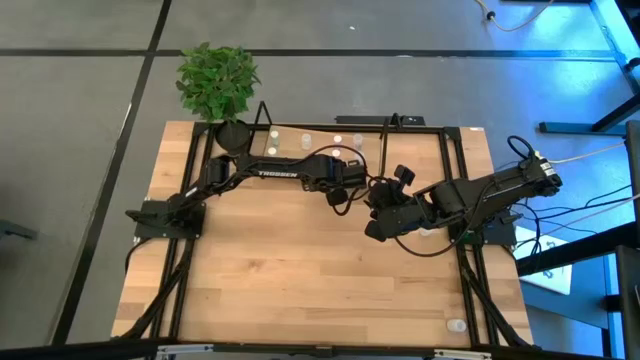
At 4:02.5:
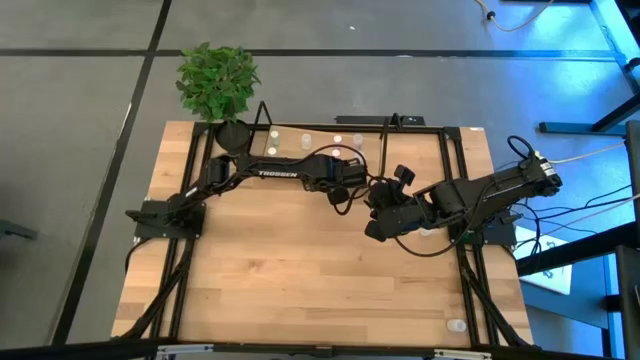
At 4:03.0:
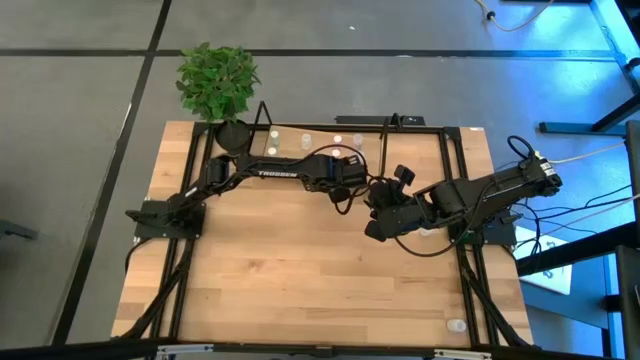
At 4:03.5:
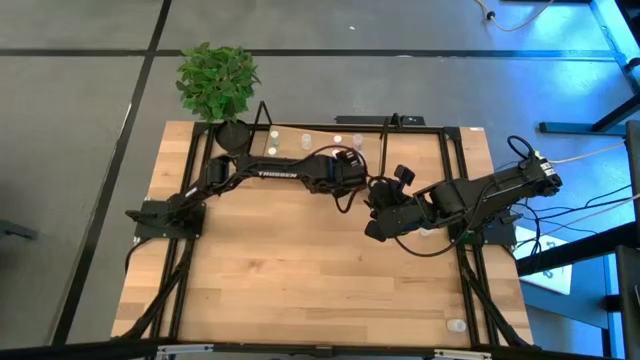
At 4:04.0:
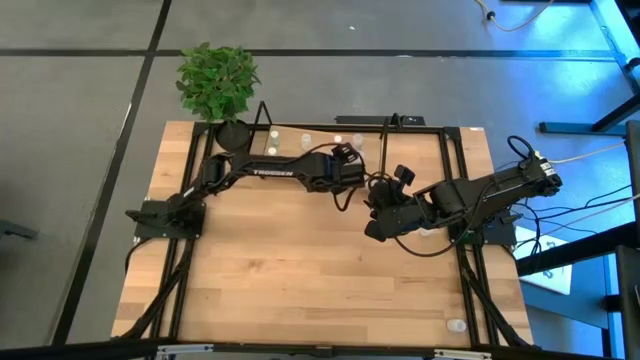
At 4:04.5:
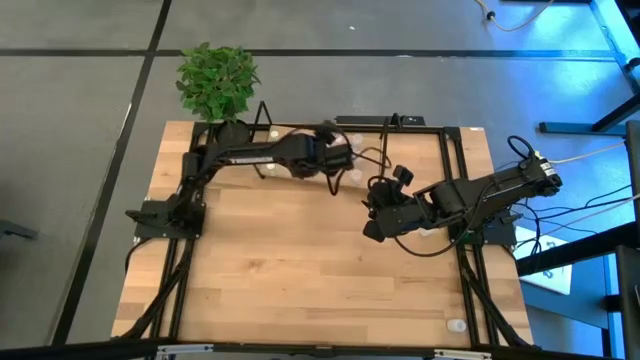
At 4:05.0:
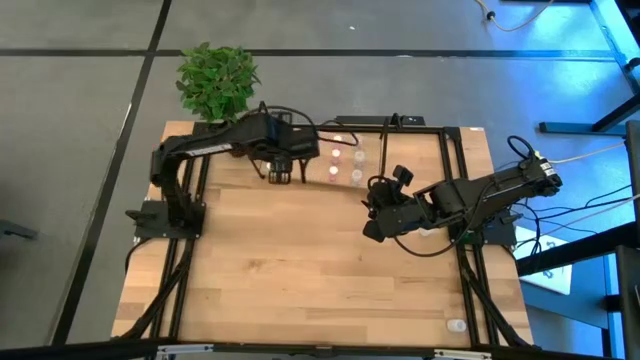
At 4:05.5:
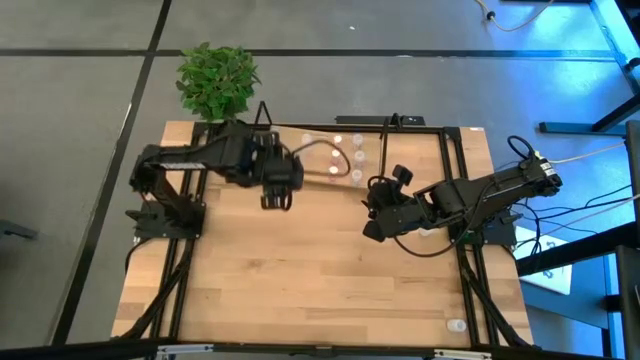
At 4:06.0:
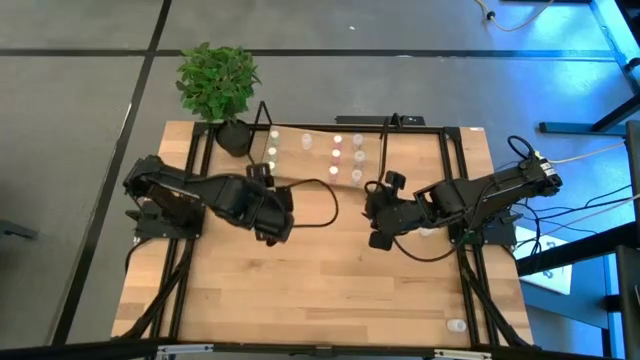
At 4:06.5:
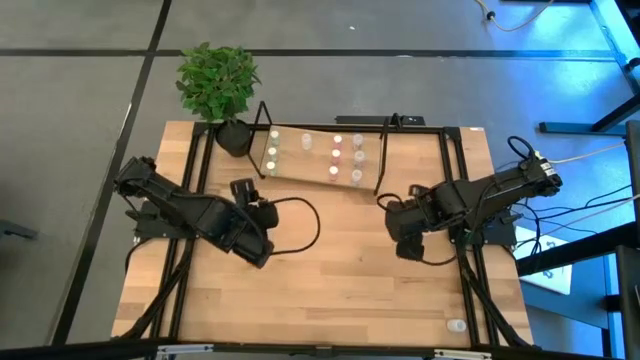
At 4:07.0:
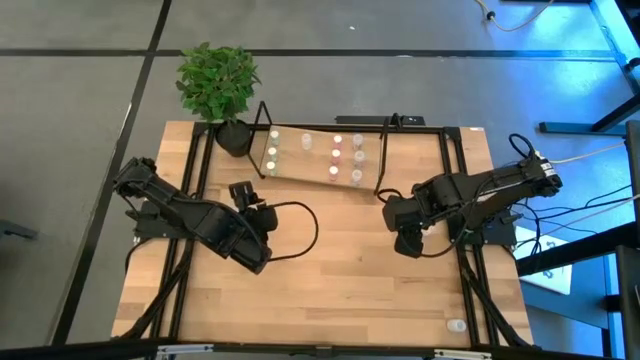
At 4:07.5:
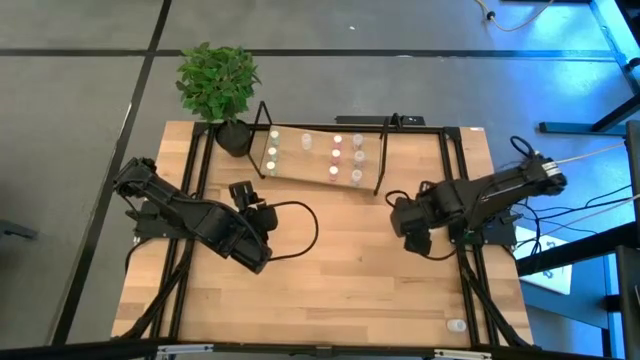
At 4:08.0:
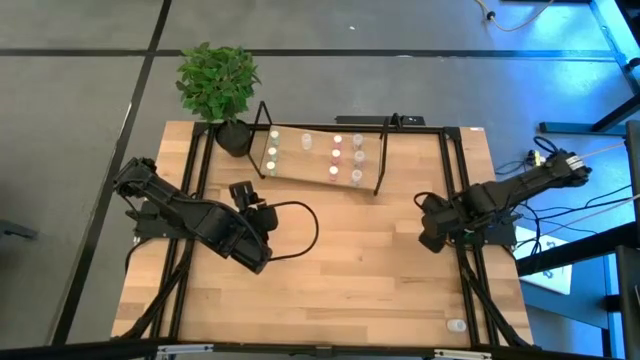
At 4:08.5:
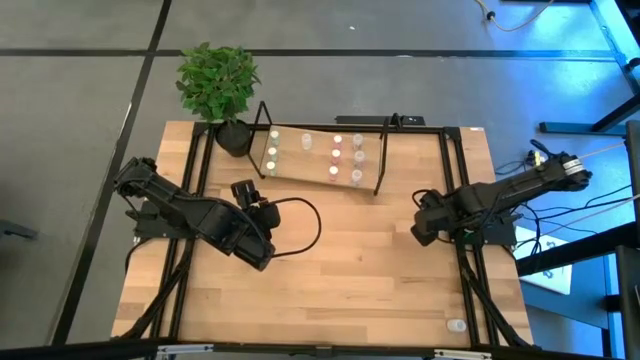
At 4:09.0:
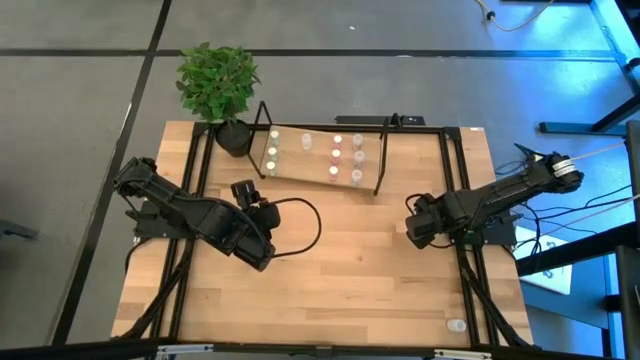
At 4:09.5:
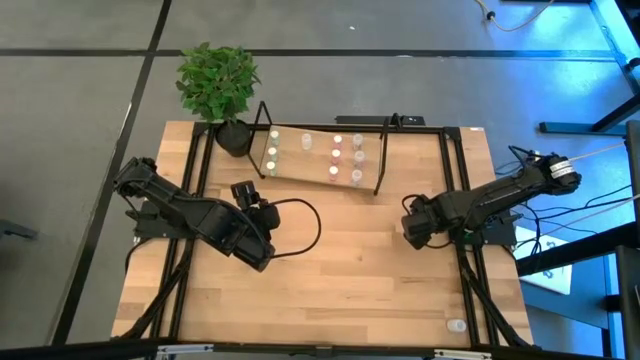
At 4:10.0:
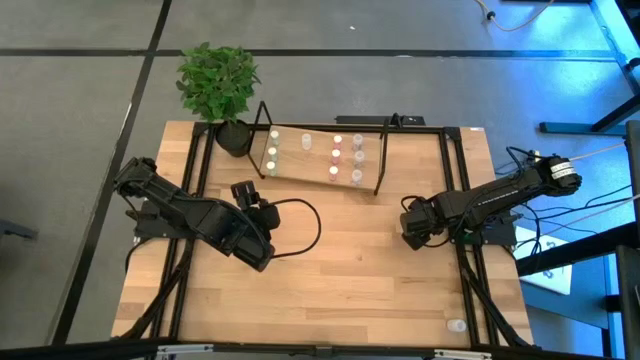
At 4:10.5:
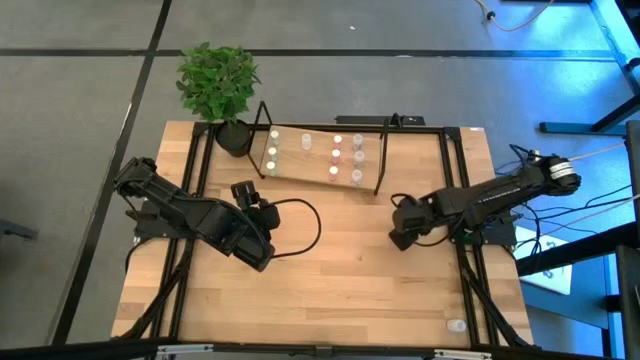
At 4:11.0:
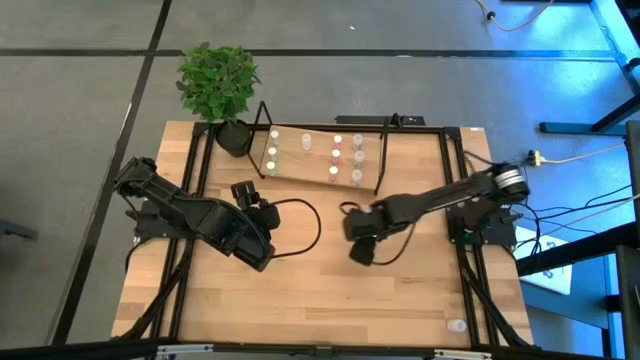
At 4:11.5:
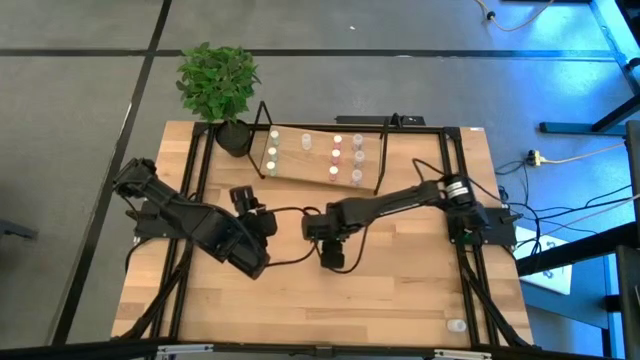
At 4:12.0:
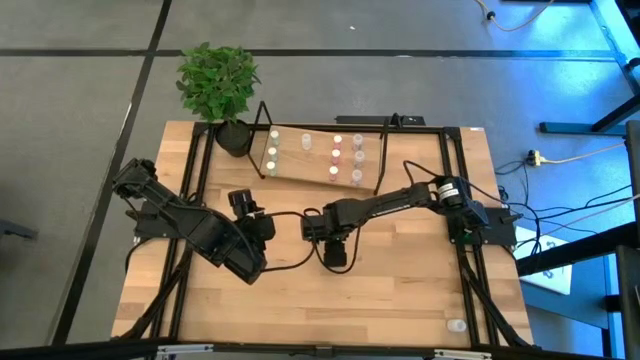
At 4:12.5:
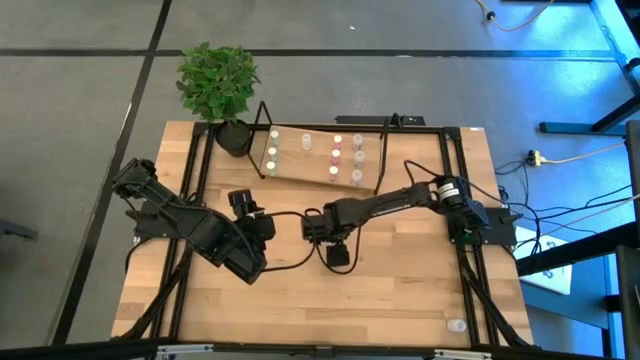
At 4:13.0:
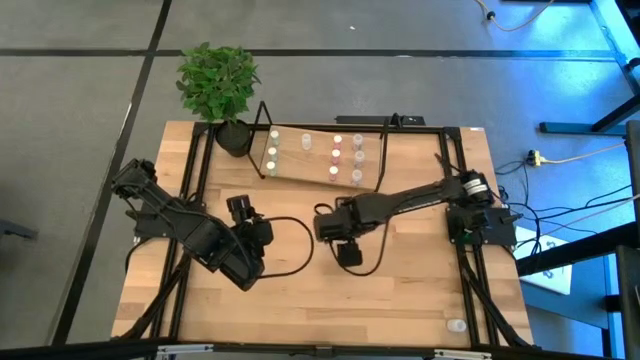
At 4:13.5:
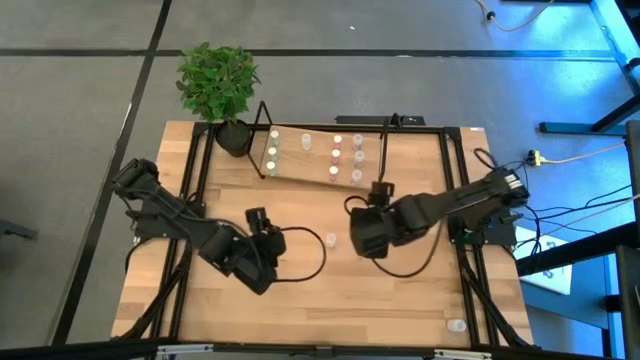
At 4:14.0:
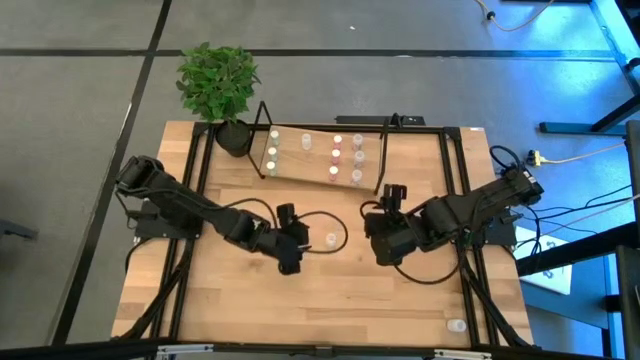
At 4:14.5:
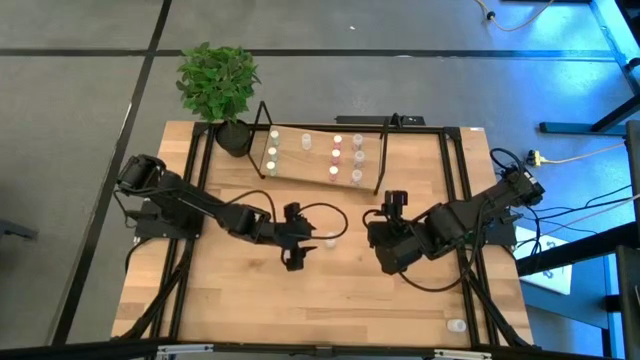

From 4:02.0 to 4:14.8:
Task: Pick and place medicine bottles onto shelf by color
Put the top white medicine bottle on the shelf aligned with the other white medicine bottle

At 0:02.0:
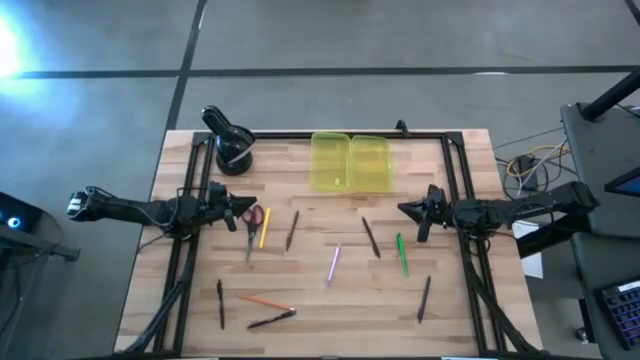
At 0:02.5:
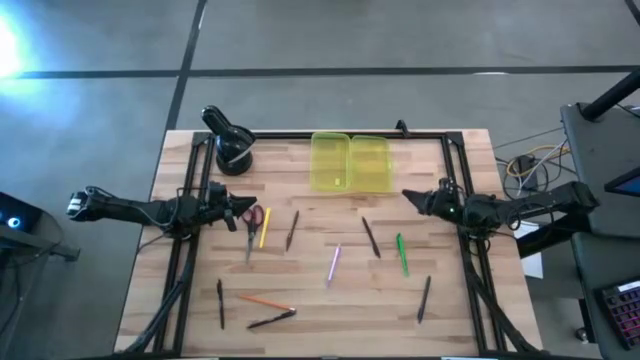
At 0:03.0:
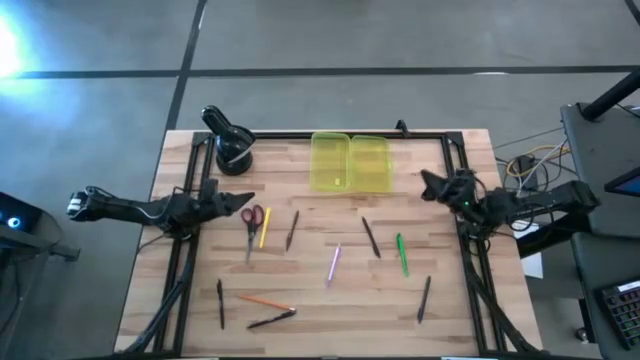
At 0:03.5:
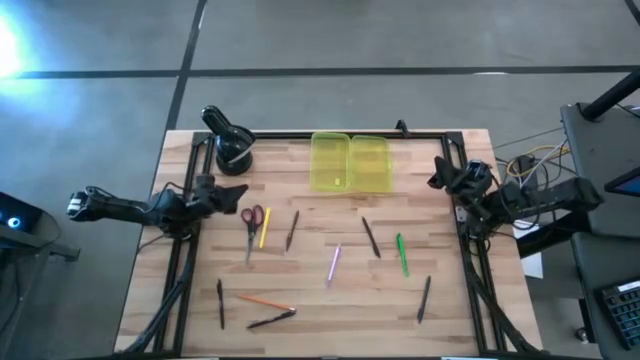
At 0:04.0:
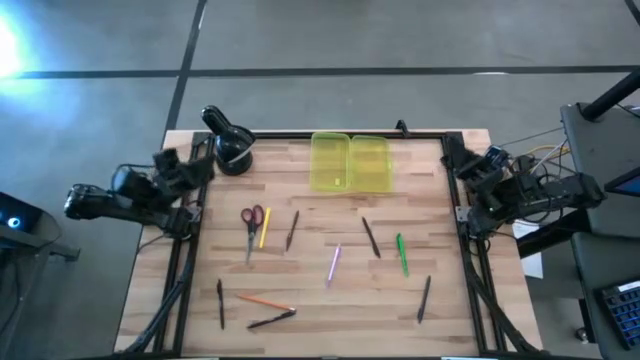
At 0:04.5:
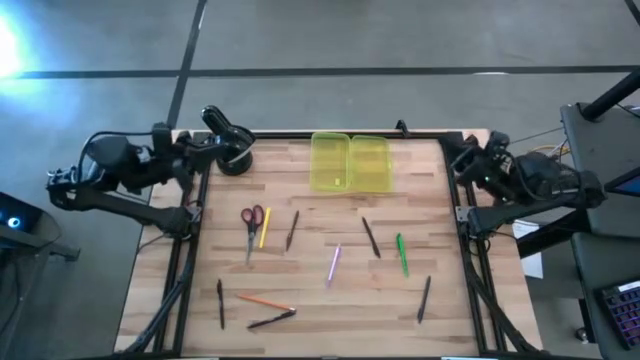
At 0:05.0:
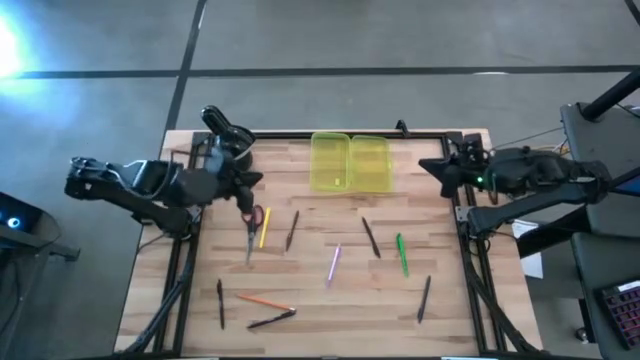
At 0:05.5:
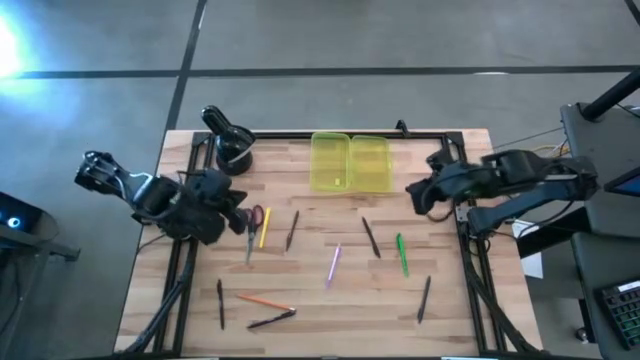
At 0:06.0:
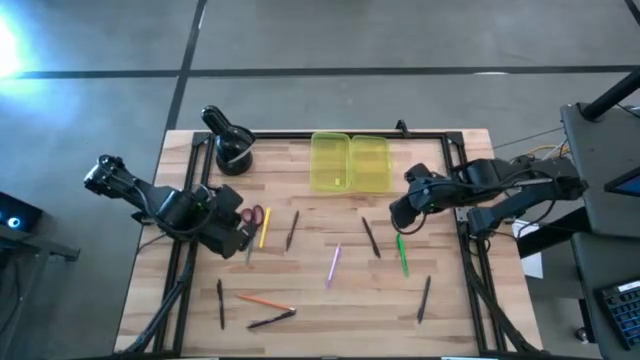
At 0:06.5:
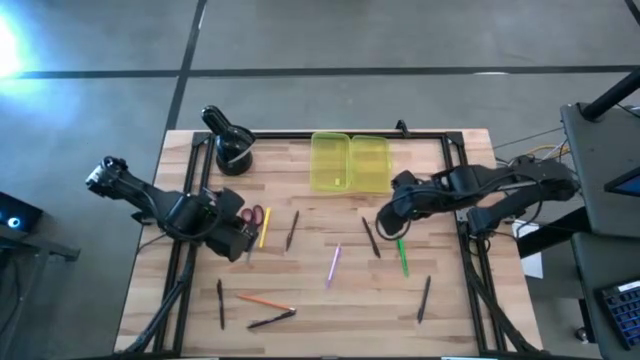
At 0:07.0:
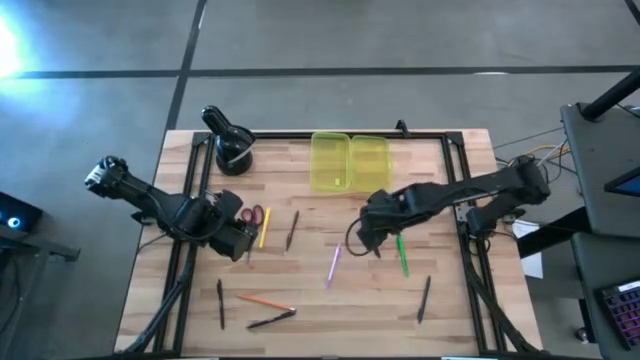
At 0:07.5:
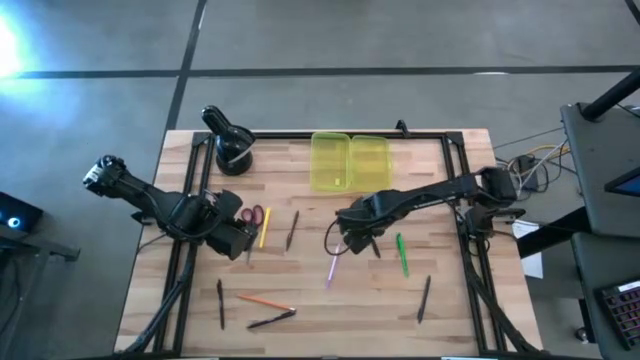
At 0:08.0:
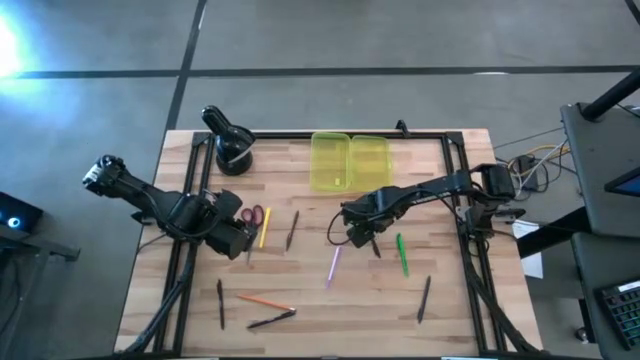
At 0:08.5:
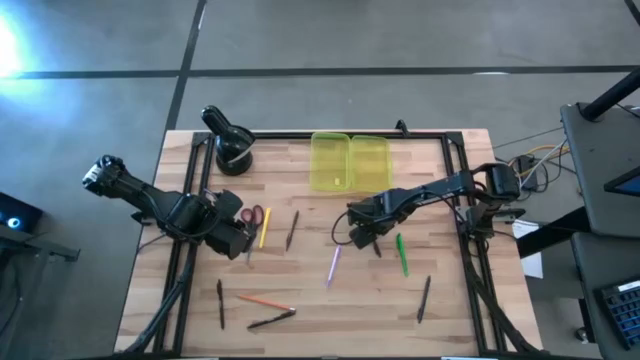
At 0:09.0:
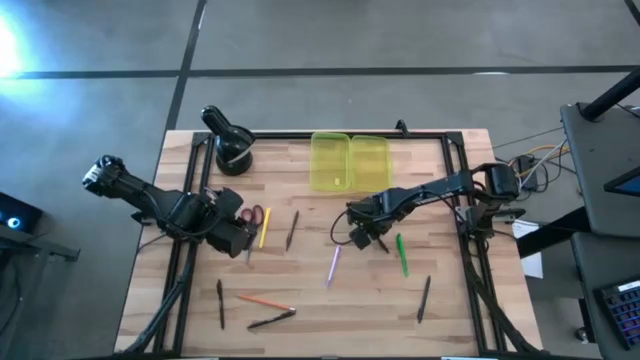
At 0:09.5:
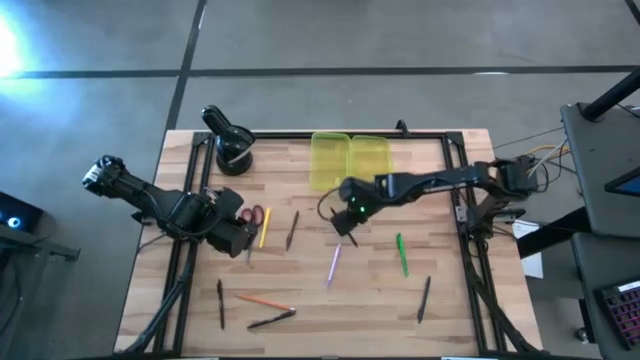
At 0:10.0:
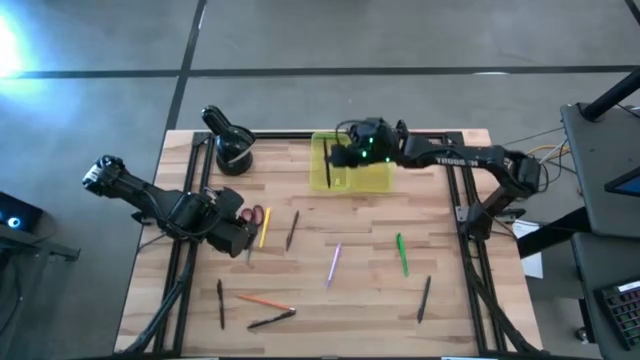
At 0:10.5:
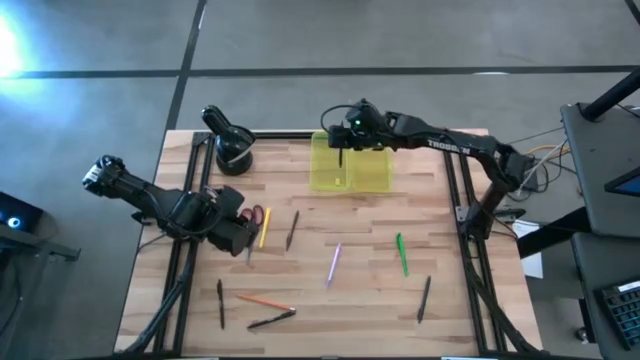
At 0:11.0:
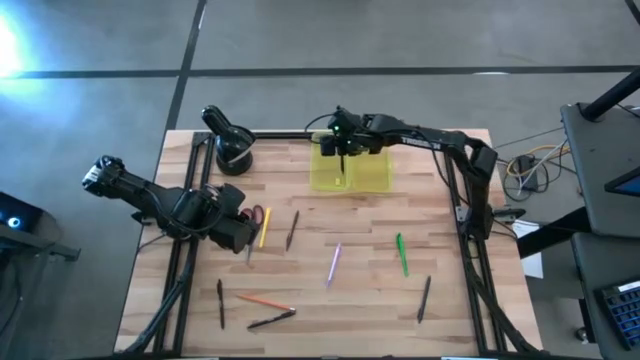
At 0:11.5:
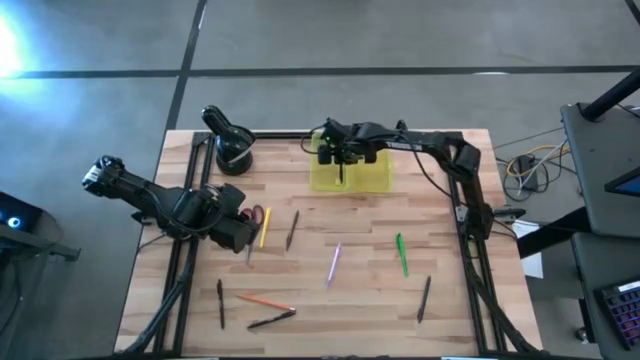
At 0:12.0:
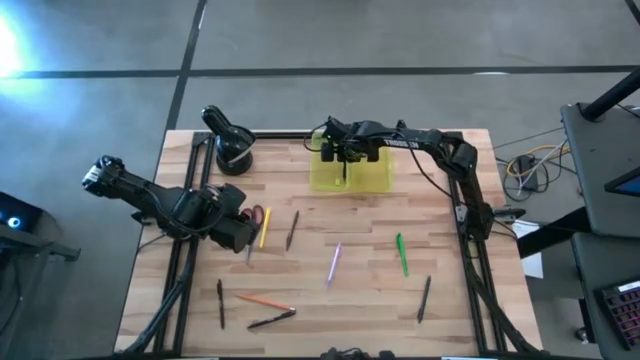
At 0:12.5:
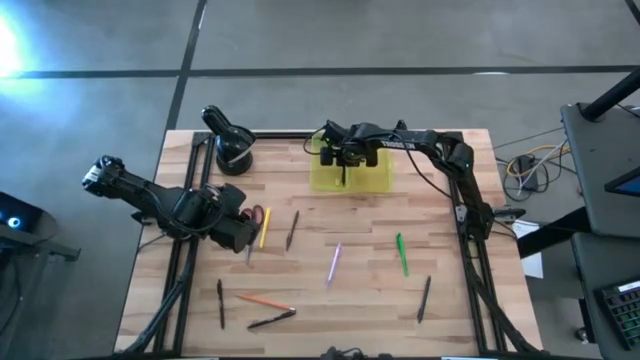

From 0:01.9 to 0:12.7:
Task: Pick & place school supplies into a supply box
Put the black pen into the yellow supply box
